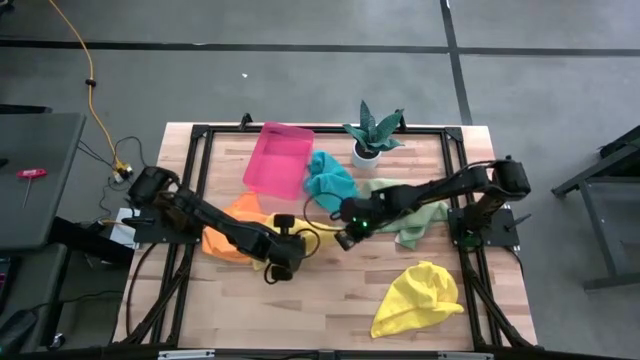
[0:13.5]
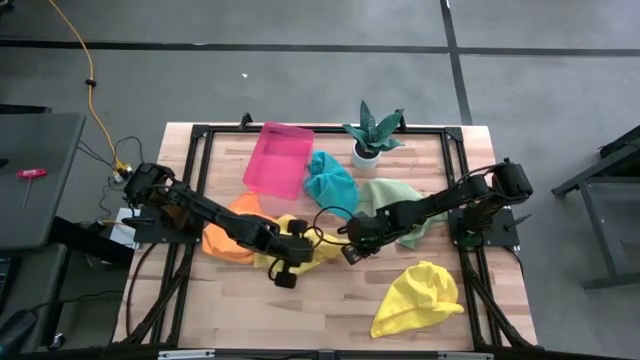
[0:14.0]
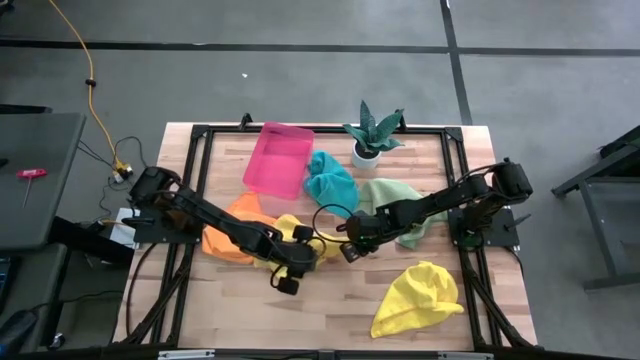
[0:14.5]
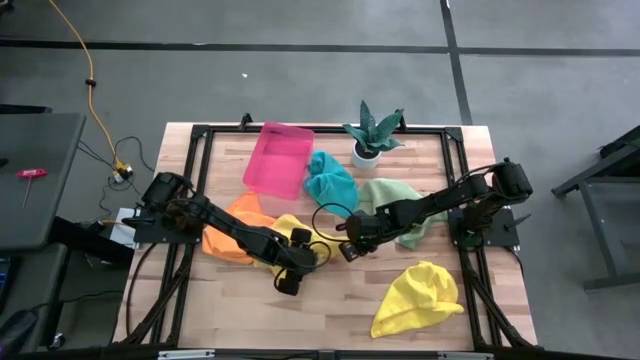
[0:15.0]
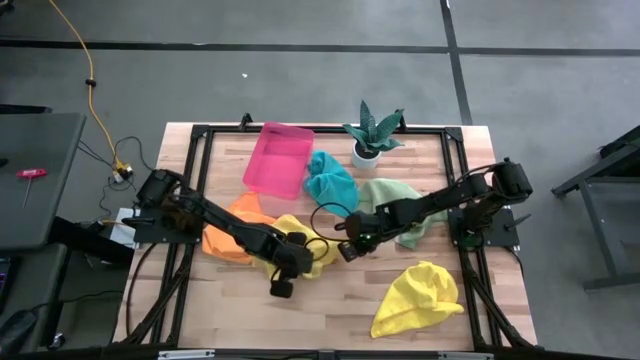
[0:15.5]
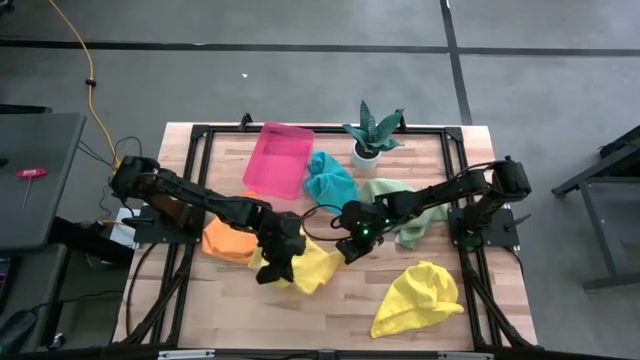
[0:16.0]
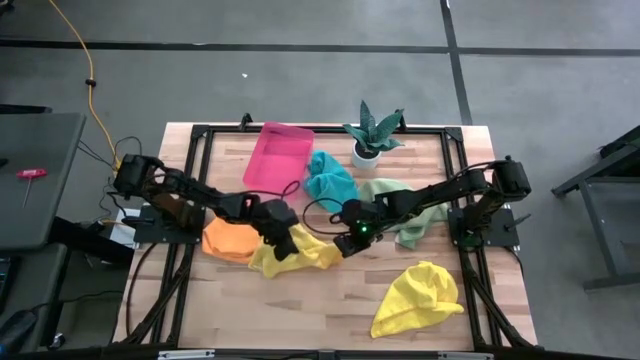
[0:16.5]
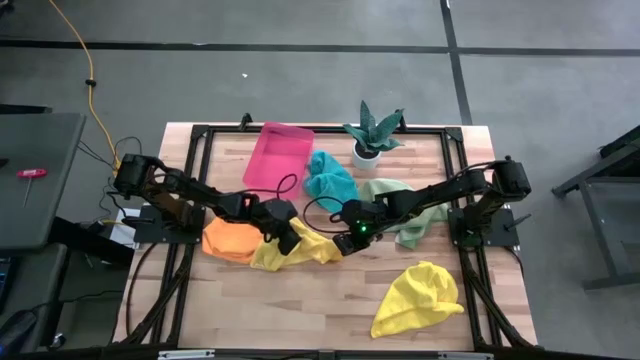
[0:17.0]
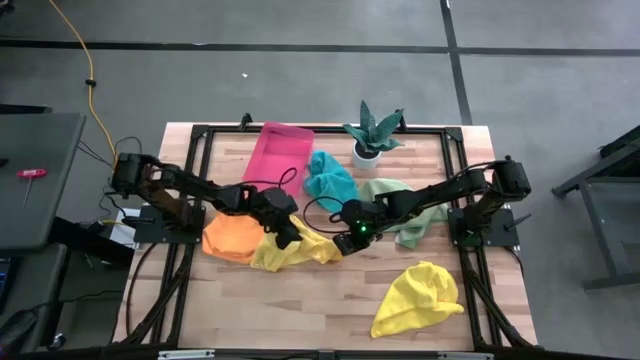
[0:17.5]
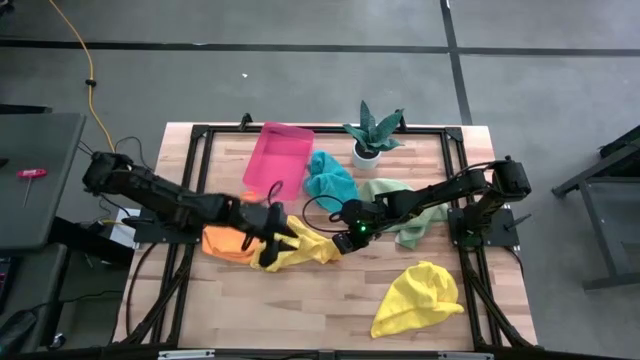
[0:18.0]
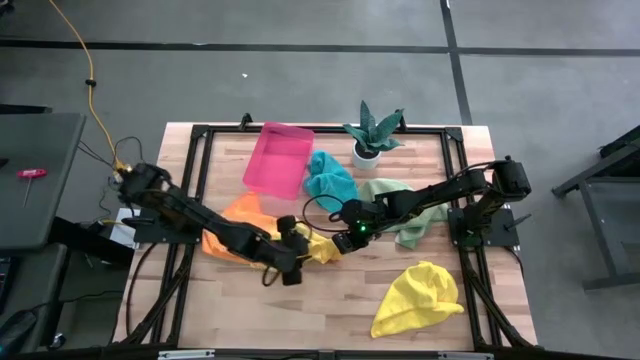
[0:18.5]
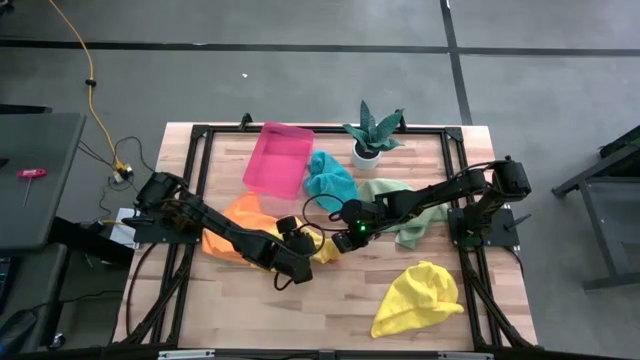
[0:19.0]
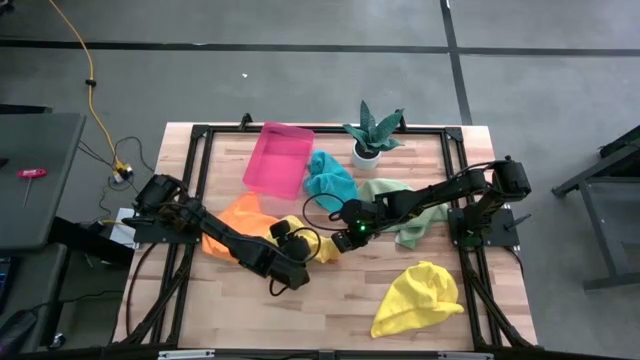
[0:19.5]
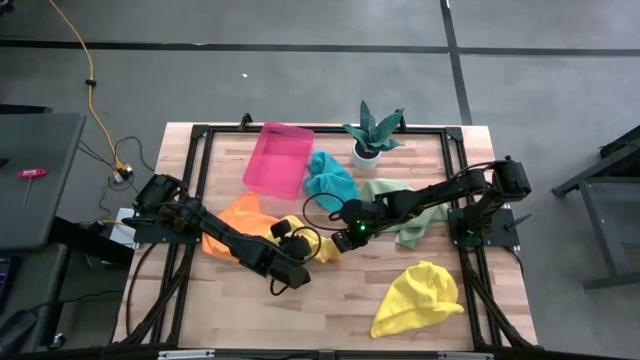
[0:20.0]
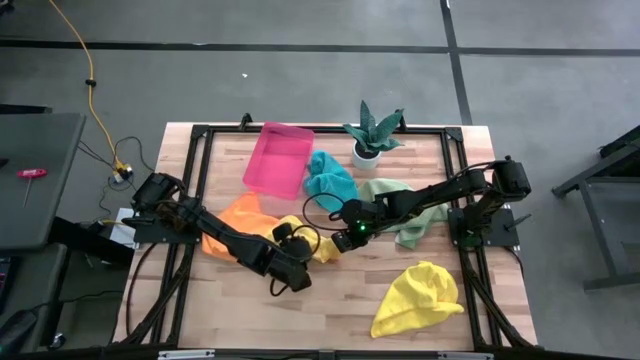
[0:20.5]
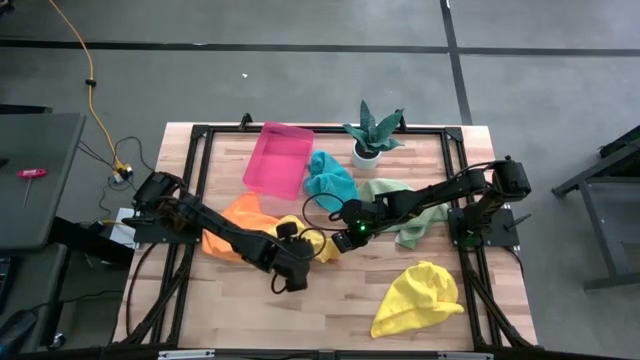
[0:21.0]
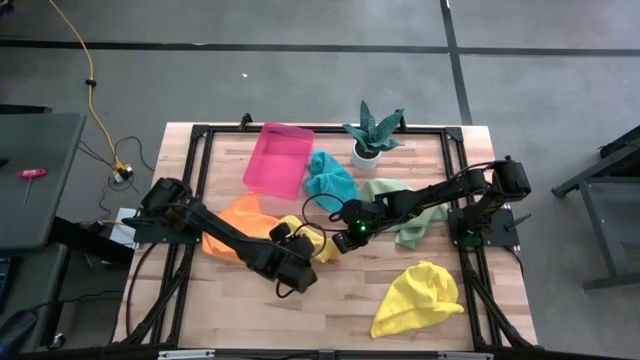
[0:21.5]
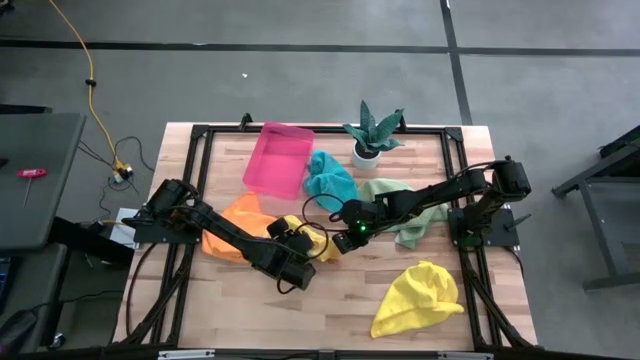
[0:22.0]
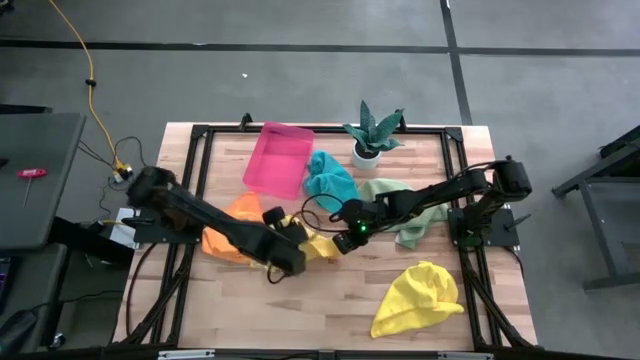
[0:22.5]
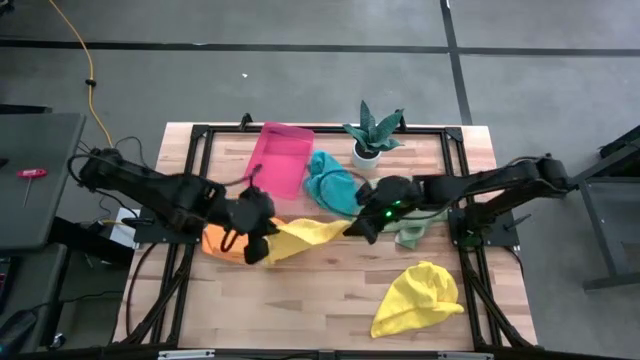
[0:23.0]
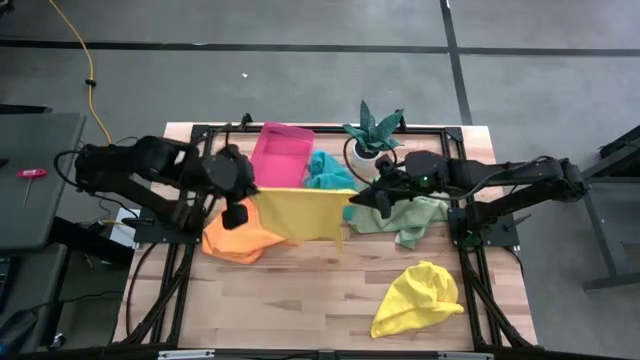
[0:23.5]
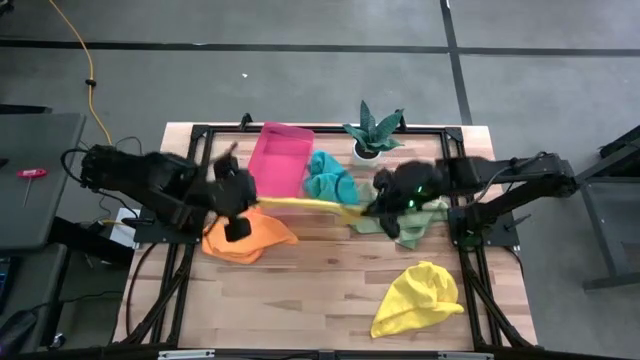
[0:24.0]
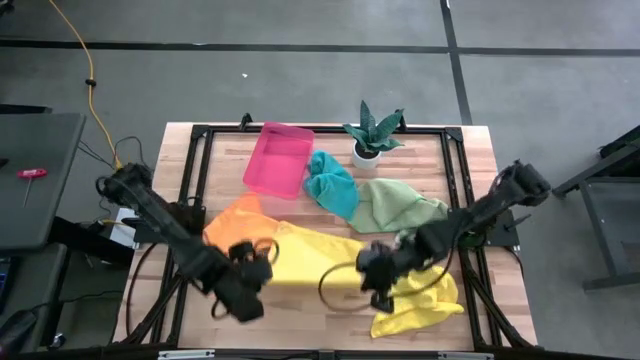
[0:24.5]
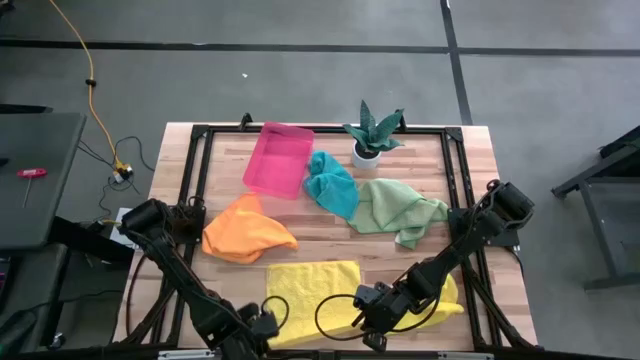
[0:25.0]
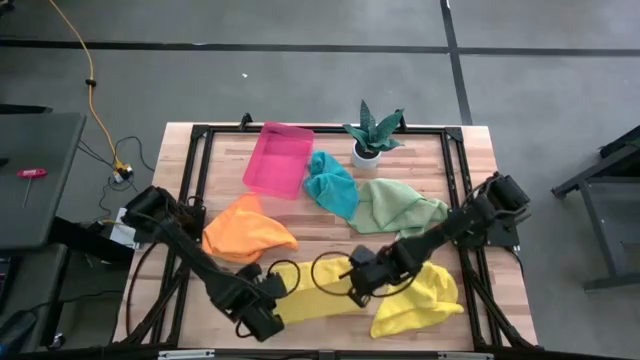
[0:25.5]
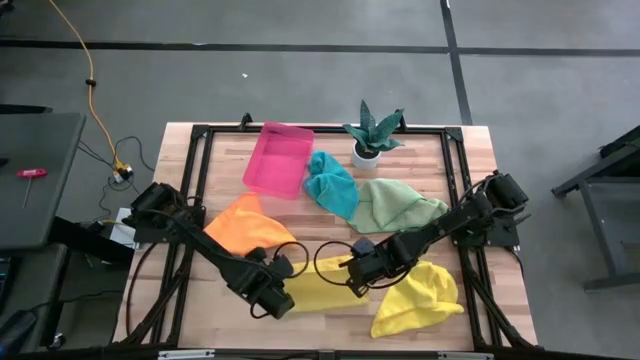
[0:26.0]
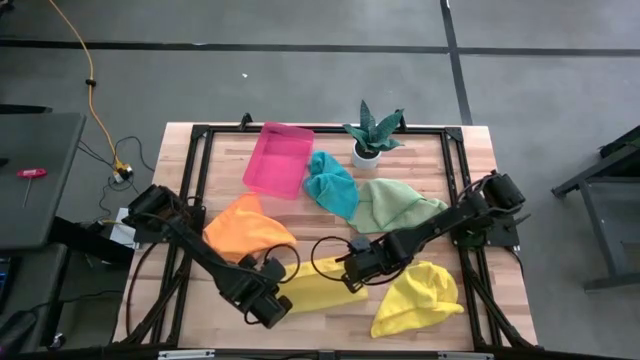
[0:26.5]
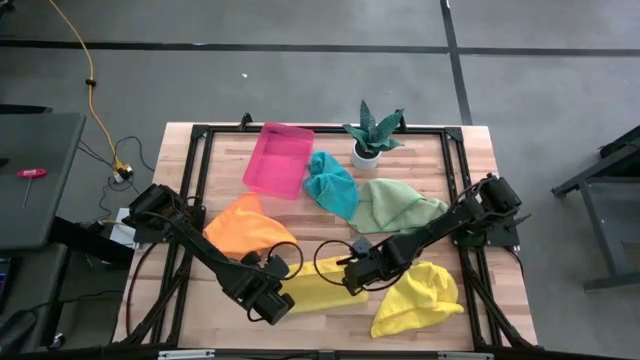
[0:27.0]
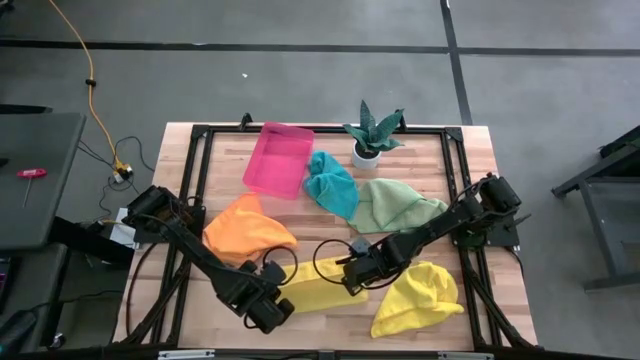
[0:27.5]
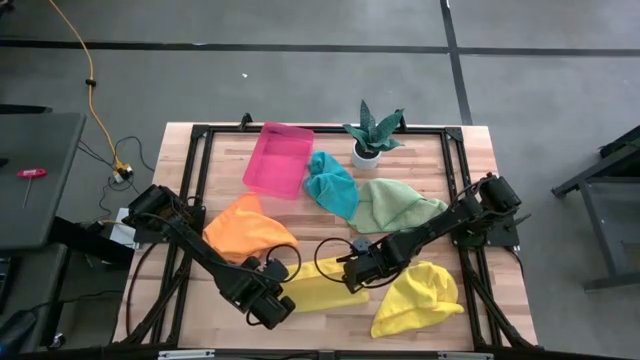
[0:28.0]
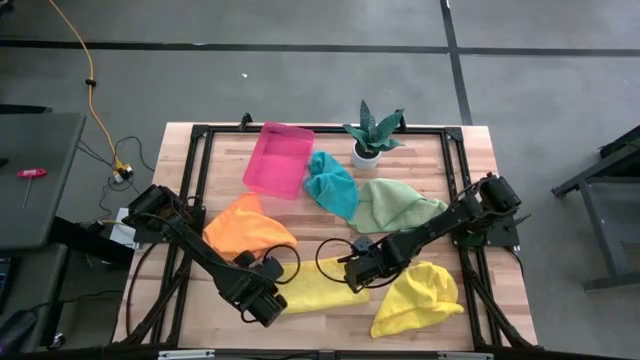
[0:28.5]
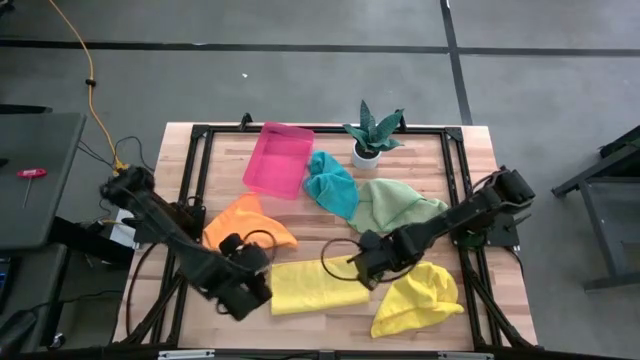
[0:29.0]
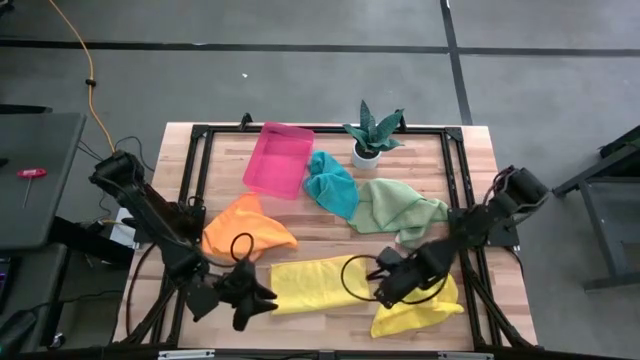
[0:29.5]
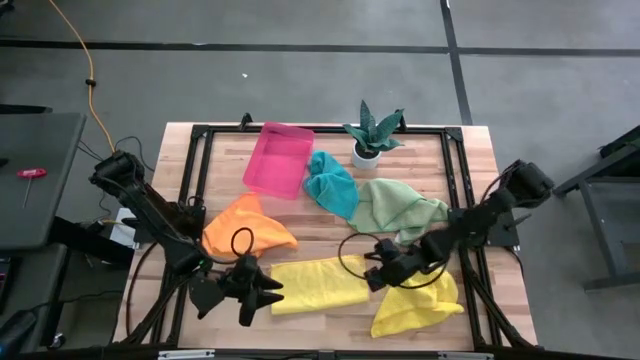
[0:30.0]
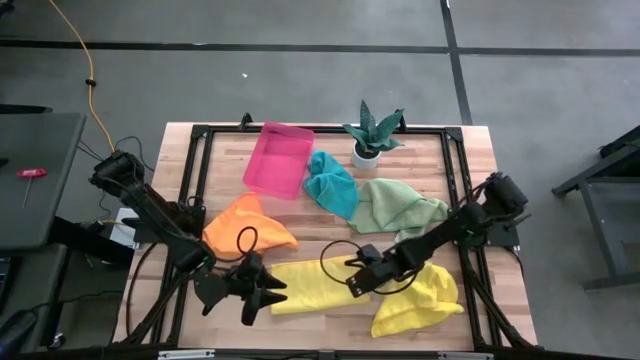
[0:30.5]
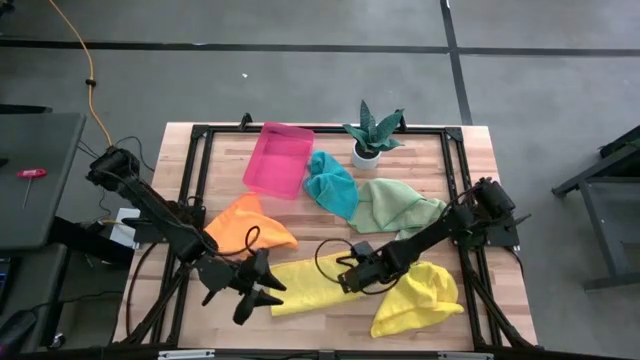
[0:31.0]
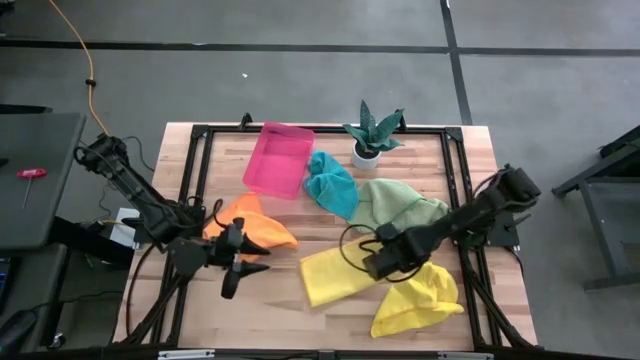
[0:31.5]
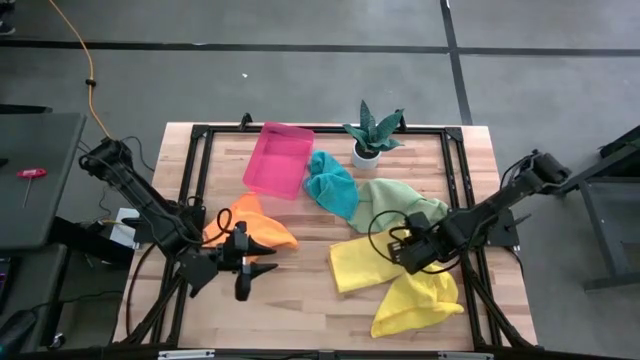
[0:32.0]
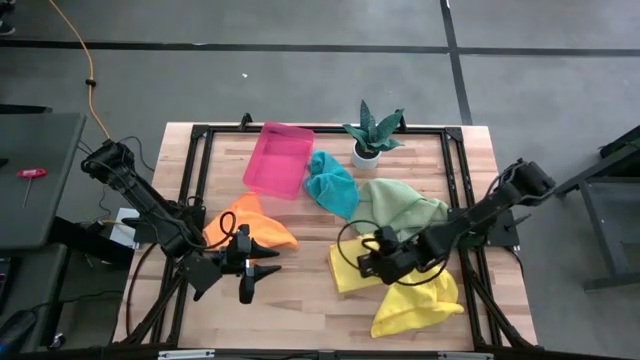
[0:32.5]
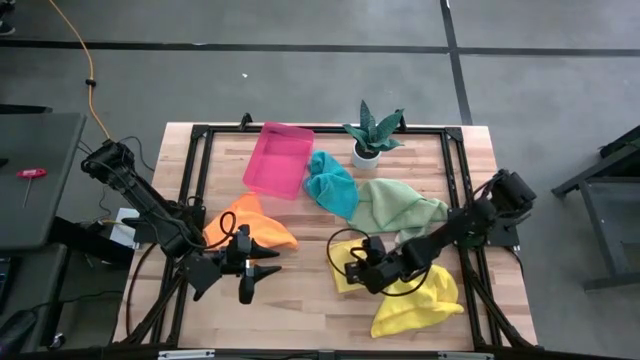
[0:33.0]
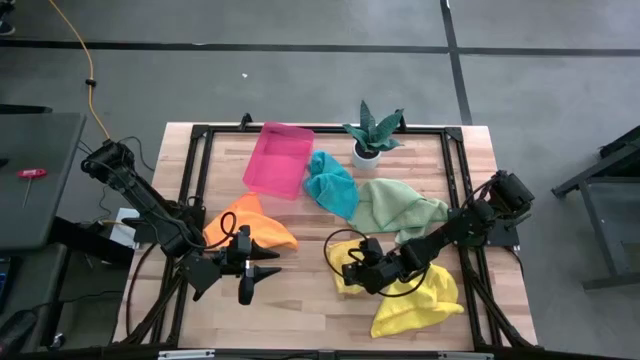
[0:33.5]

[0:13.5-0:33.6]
Task: Fold microfiber towels
Fold the left yellow microfiber cloth
